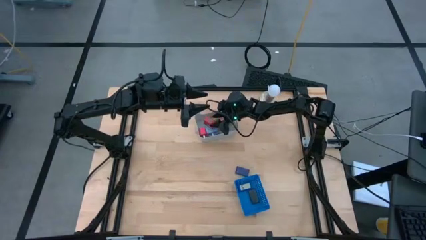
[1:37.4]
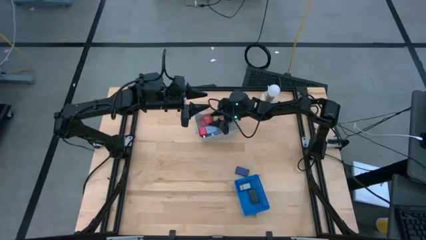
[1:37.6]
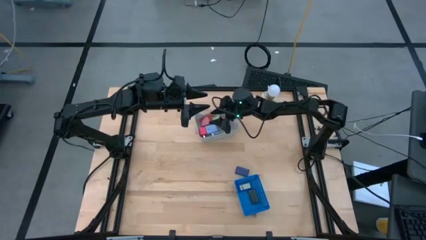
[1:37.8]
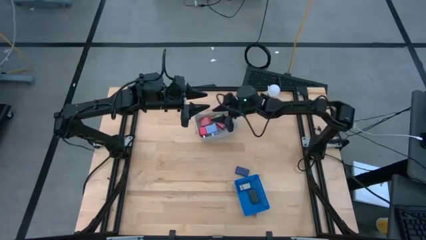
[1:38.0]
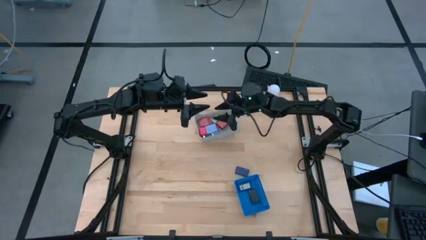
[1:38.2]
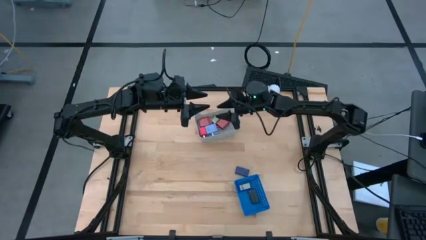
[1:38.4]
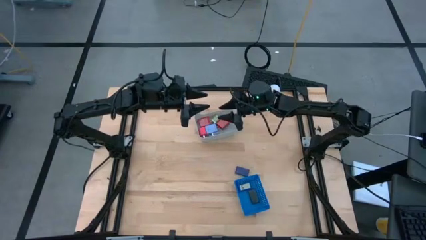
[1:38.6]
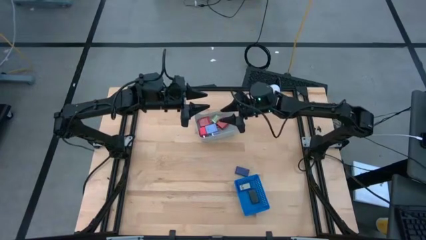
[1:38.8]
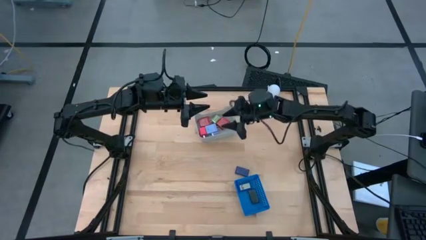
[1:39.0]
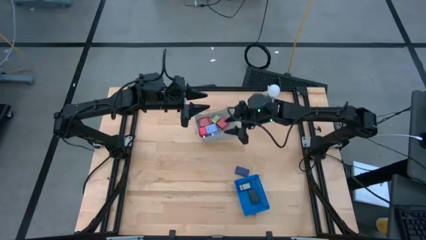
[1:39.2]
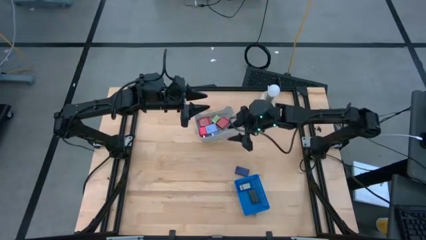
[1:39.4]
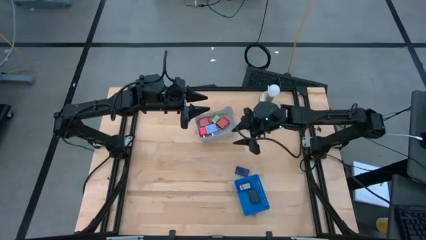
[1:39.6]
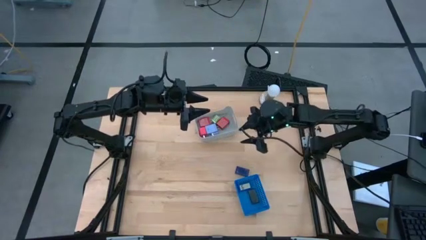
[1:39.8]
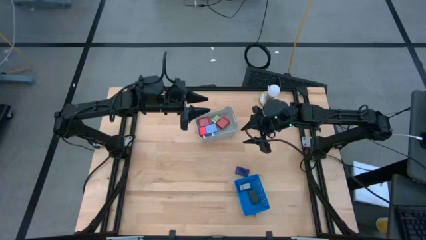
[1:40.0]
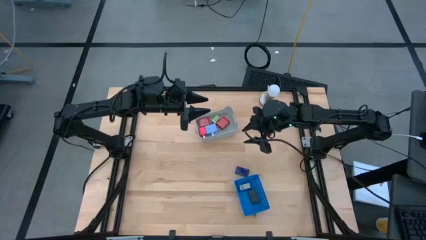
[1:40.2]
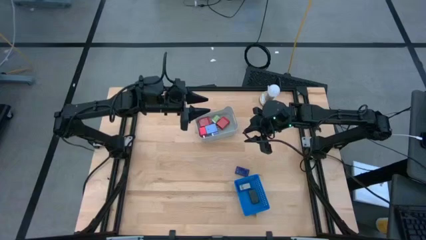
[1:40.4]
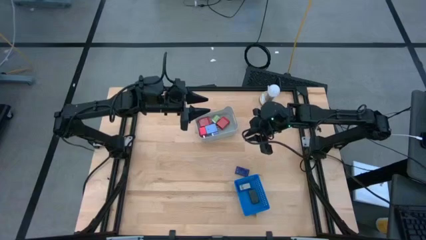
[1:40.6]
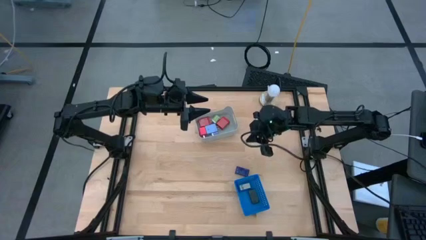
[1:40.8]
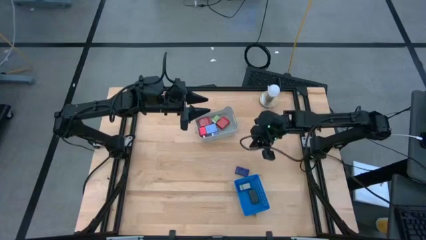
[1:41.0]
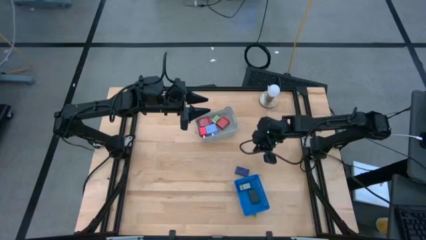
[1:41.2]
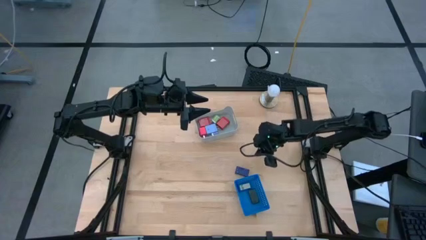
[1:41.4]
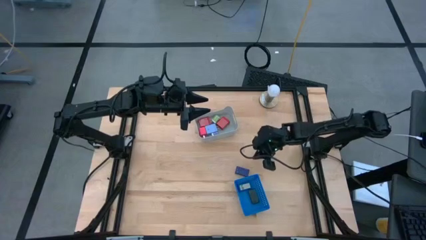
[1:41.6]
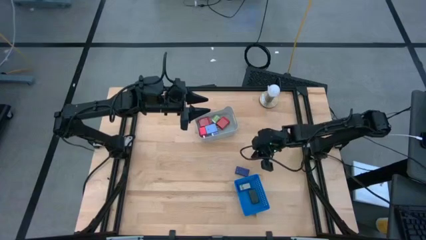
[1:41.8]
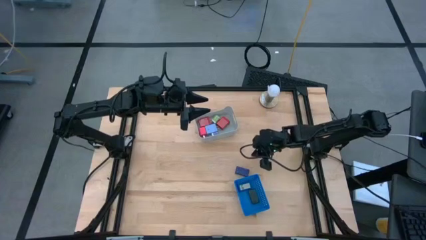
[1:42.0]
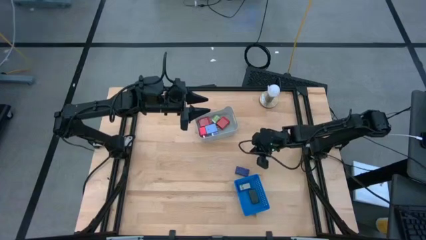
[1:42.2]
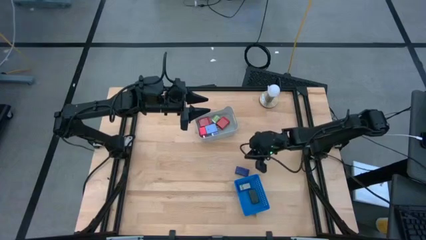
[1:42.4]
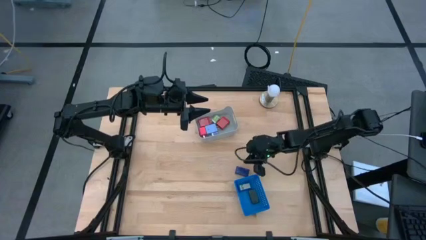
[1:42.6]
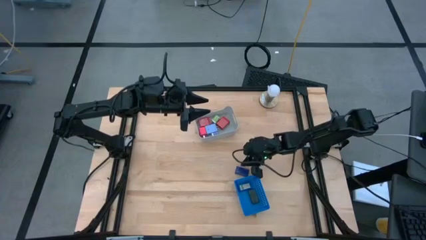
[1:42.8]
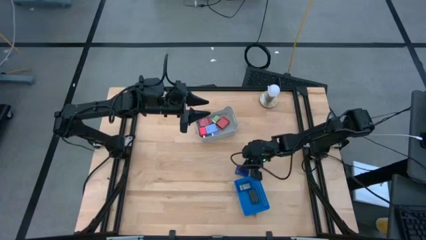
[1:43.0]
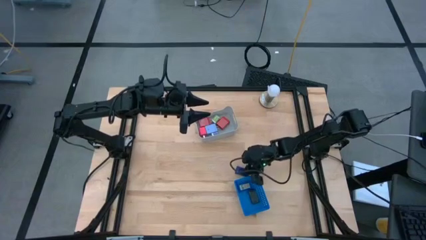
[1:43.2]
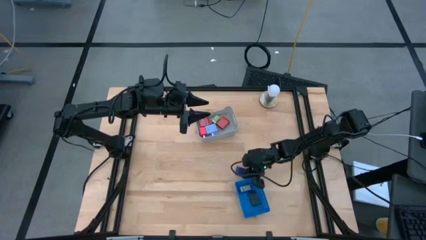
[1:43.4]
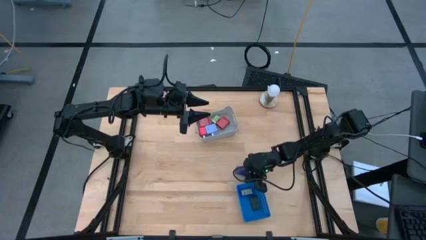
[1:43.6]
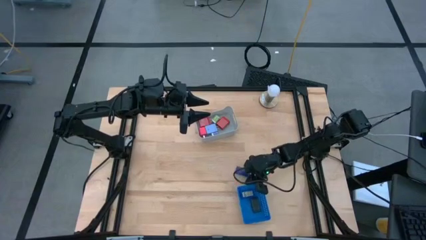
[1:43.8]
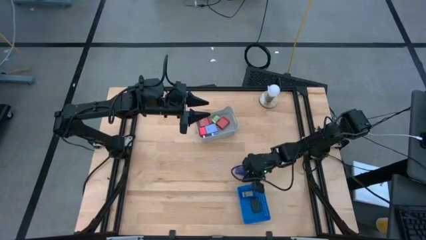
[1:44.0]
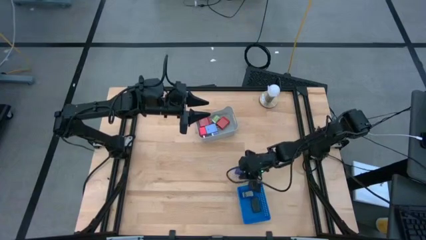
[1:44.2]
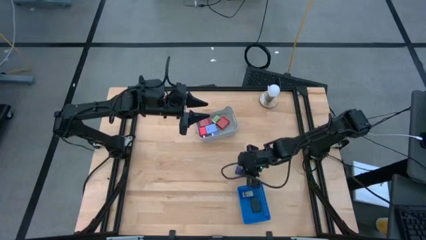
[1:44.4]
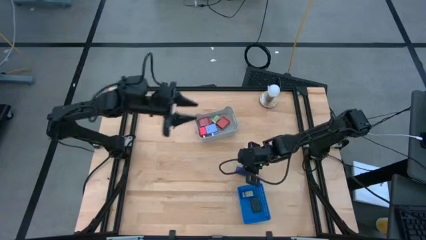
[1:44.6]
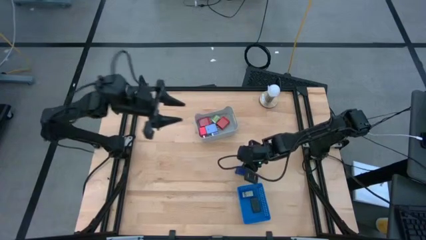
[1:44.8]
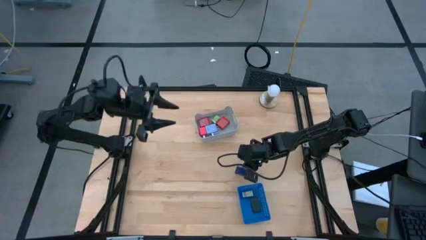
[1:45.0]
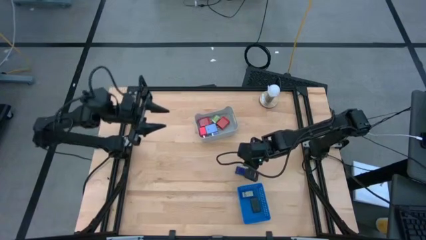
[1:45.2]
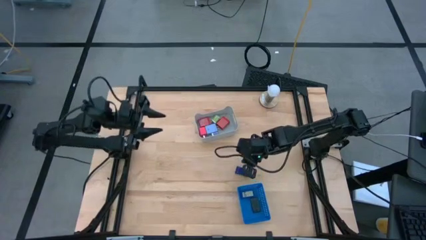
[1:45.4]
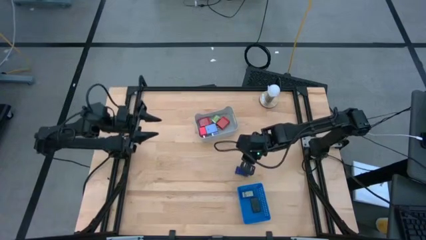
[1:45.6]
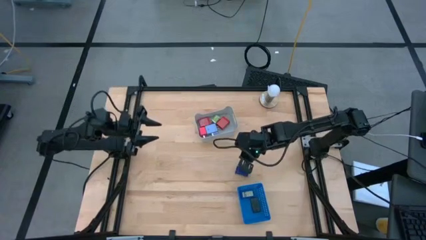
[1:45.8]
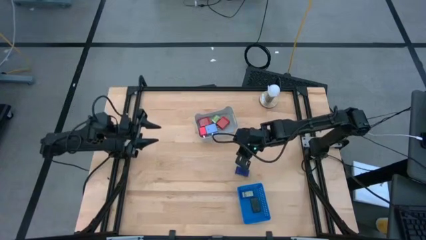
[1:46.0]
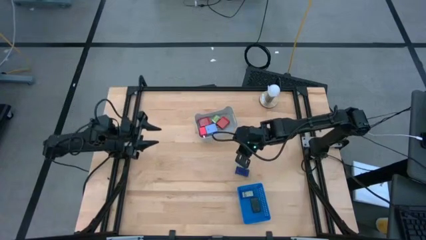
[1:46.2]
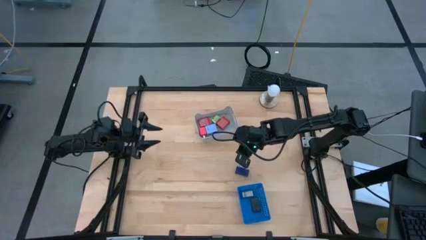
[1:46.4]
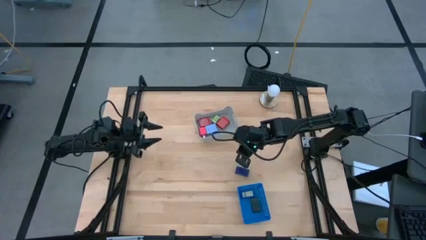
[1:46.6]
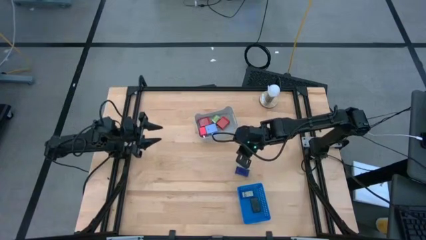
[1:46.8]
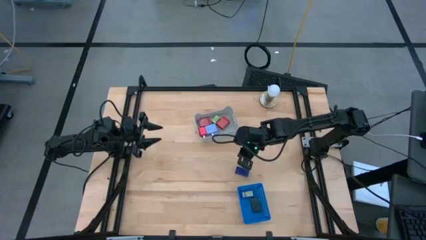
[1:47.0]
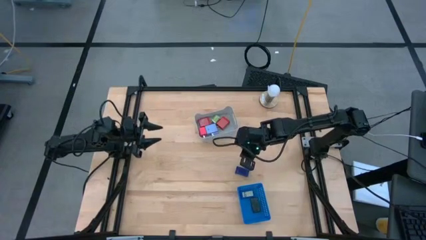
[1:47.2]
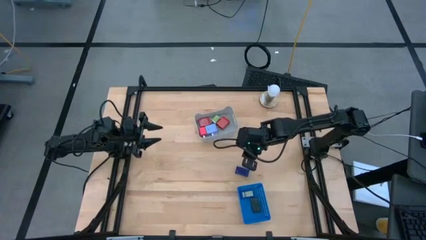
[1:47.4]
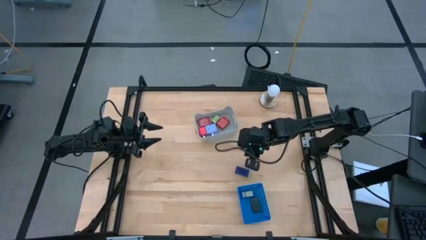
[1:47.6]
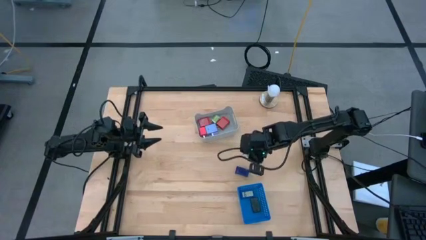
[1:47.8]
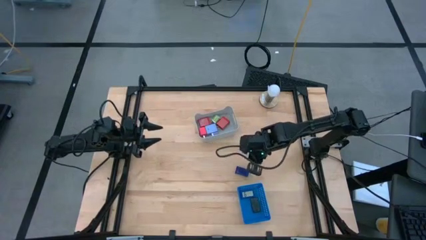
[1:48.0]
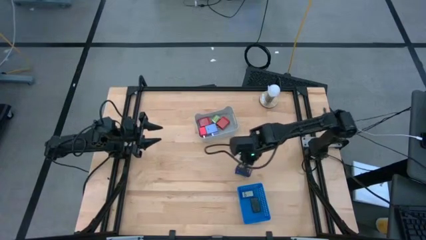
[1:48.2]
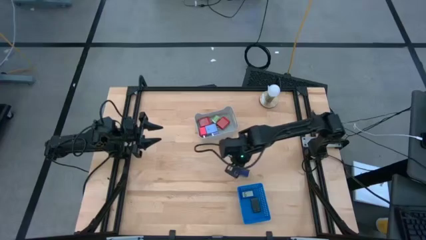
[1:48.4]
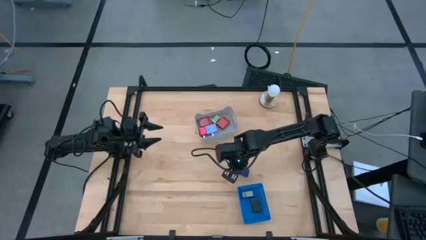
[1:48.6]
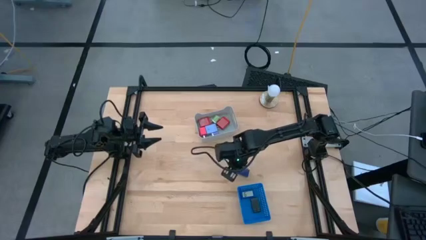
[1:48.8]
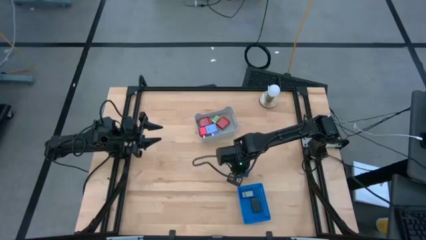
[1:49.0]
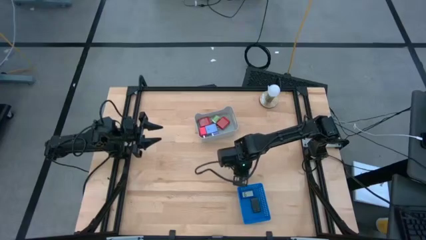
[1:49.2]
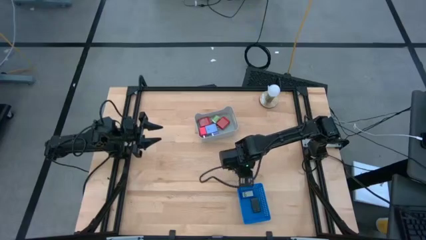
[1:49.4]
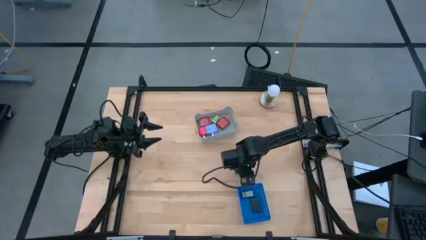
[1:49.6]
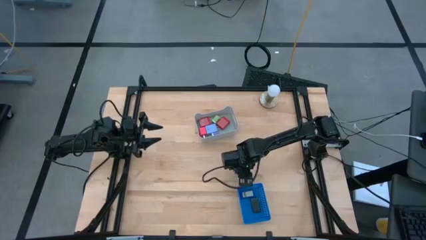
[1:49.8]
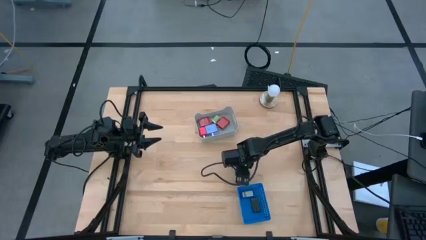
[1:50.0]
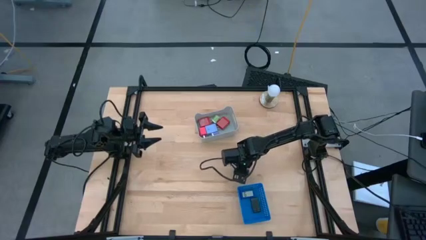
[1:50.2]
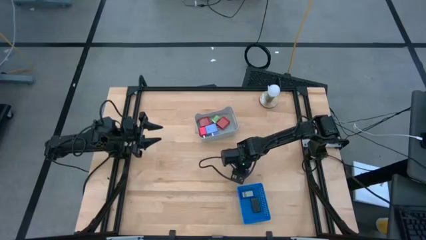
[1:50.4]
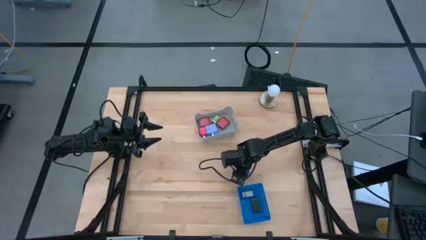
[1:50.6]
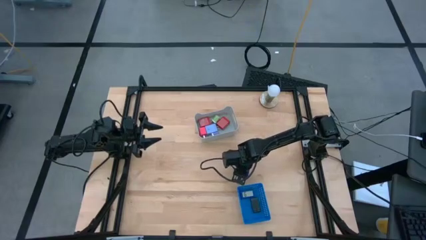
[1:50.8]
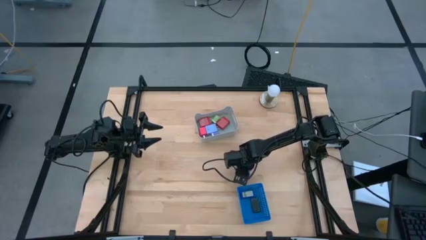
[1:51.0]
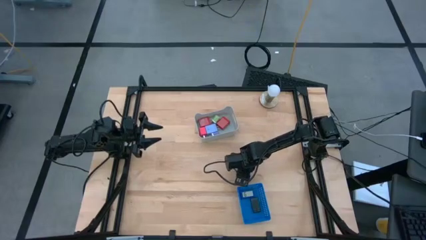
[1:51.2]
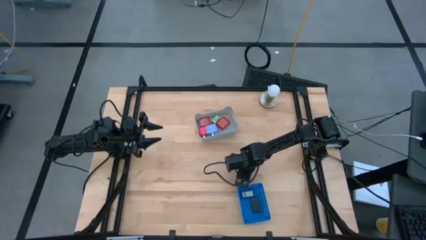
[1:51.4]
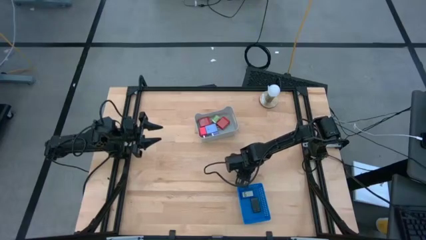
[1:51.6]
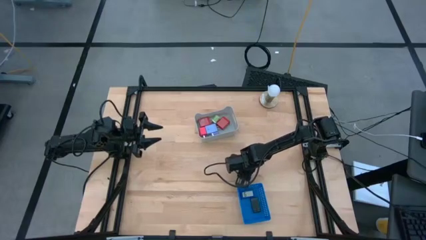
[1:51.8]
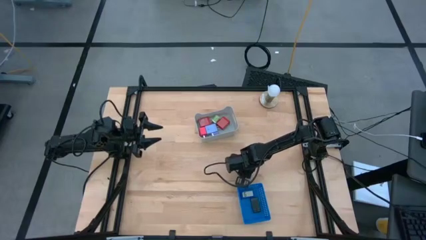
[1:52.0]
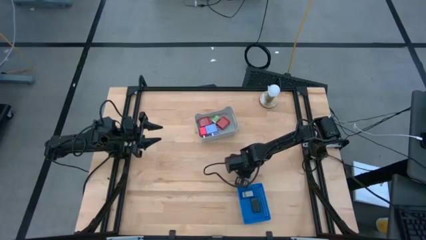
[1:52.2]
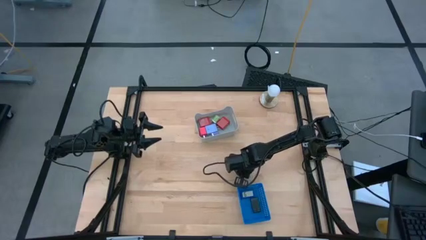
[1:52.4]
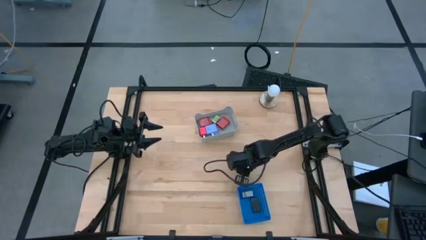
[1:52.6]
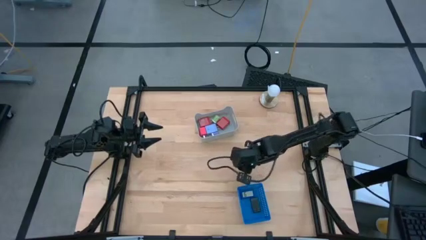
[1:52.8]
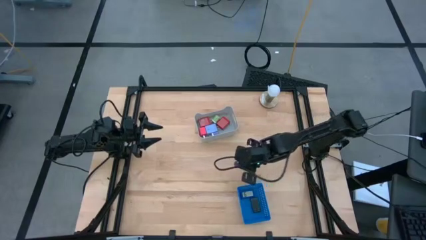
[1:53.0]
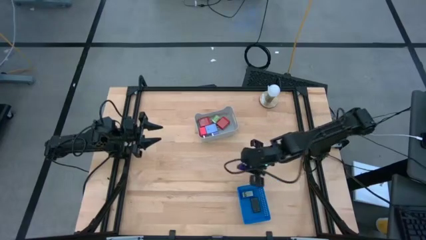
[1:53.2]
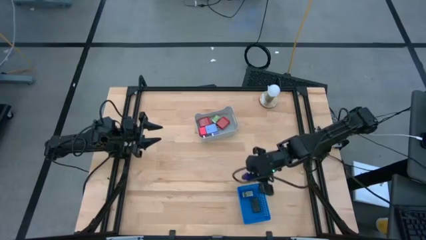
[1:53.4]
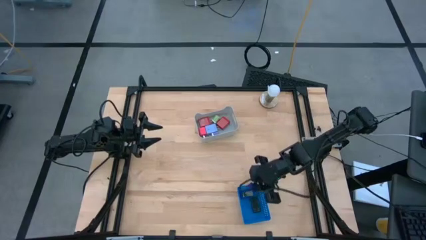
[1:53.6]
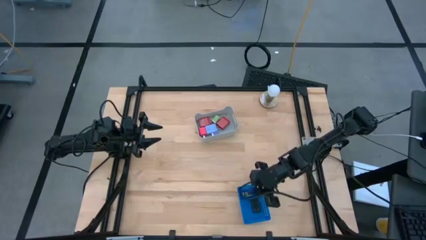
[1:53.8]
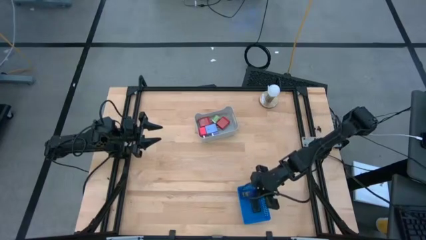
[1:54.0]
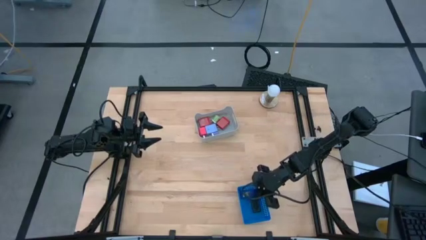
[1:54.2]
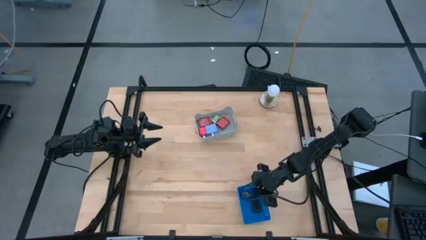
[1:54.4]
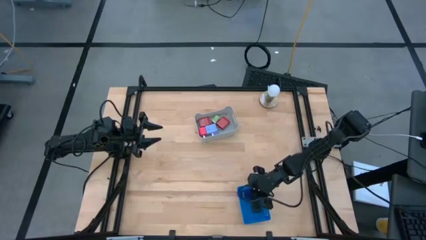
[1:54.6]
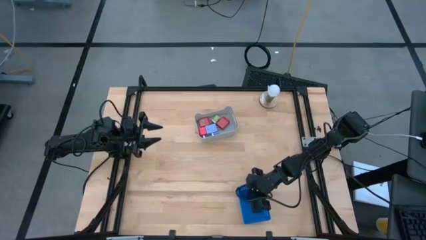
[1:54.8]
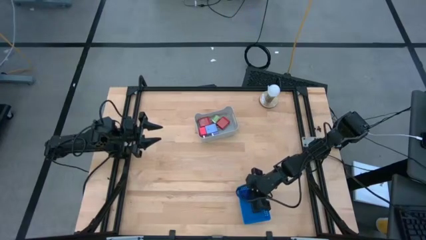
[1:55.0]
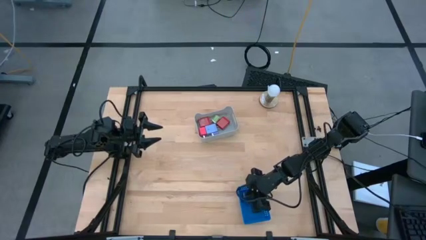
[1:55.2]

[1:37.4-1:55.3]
Task: Pick & Place Office items
Put the dark blue timer into the blue bin
